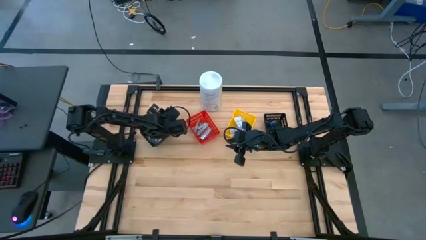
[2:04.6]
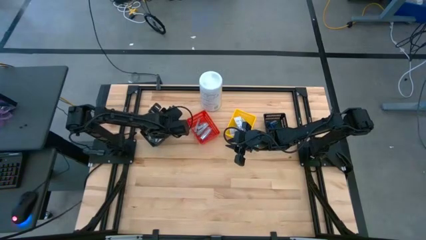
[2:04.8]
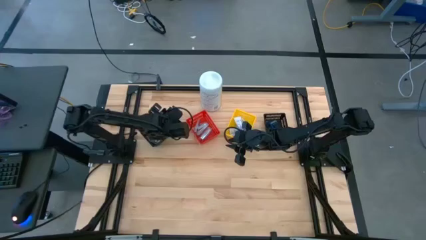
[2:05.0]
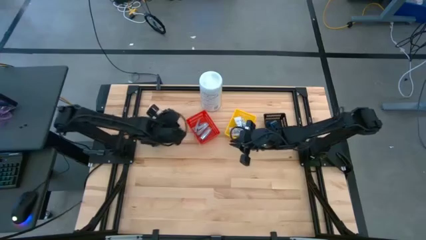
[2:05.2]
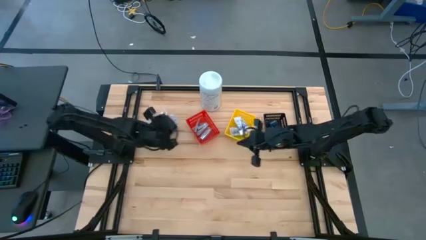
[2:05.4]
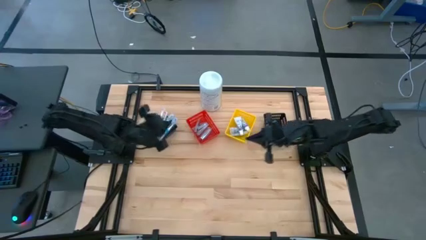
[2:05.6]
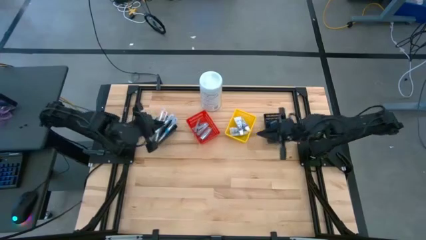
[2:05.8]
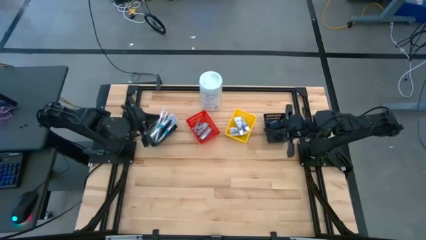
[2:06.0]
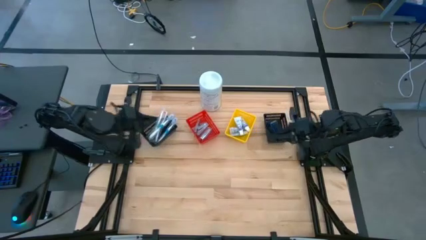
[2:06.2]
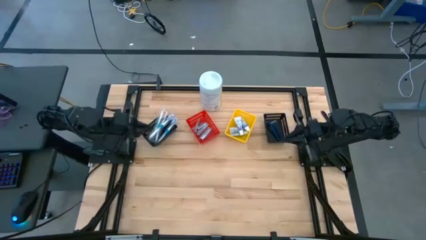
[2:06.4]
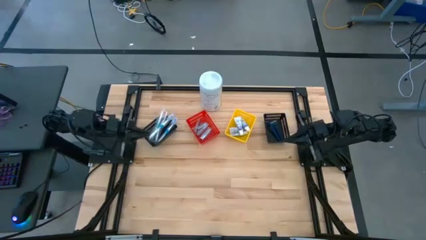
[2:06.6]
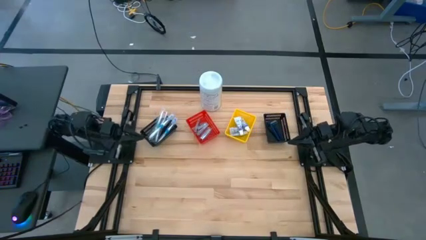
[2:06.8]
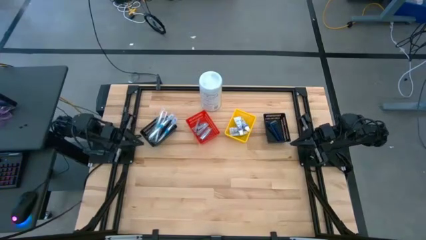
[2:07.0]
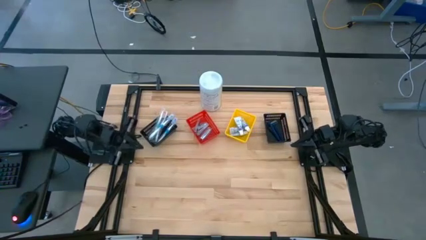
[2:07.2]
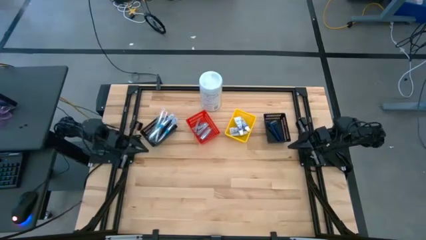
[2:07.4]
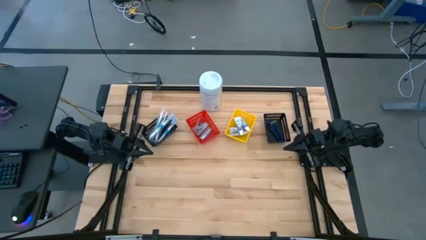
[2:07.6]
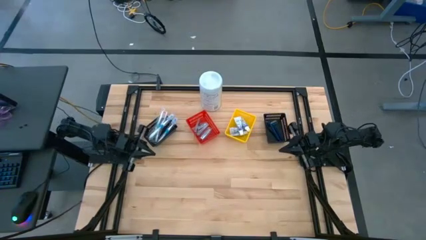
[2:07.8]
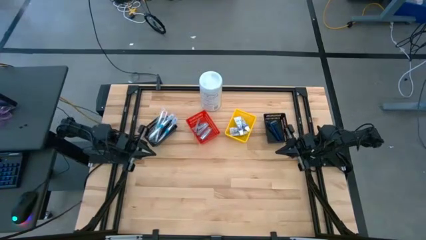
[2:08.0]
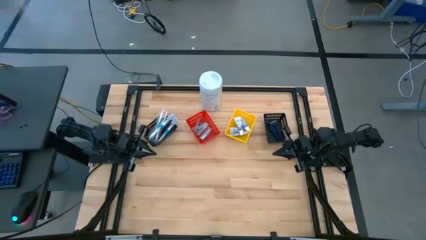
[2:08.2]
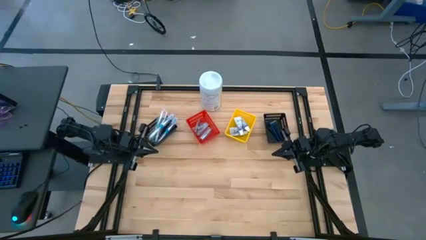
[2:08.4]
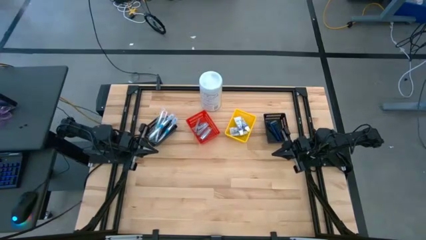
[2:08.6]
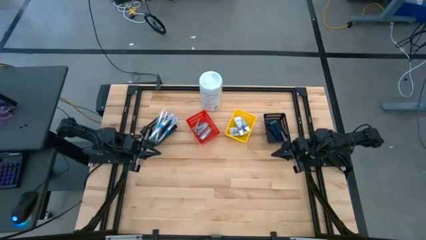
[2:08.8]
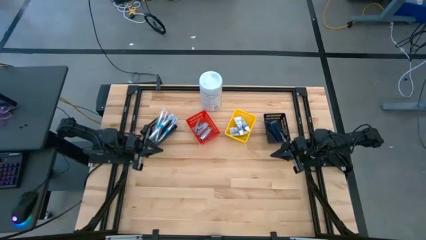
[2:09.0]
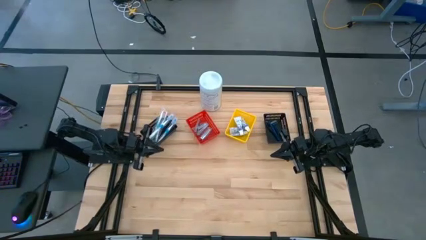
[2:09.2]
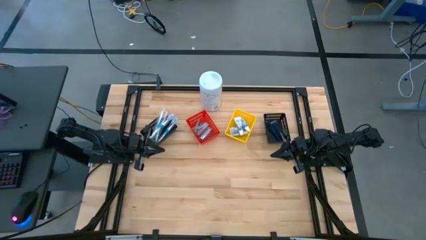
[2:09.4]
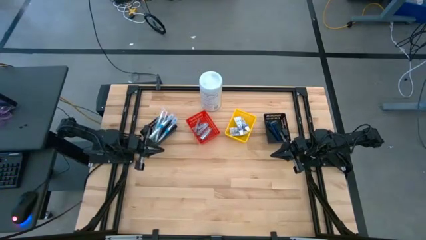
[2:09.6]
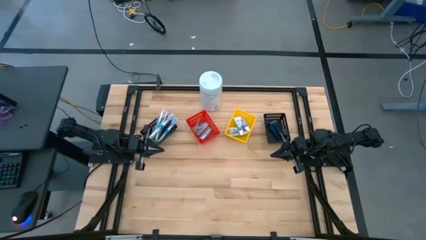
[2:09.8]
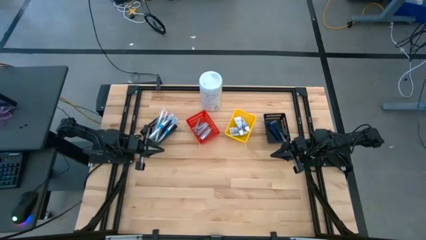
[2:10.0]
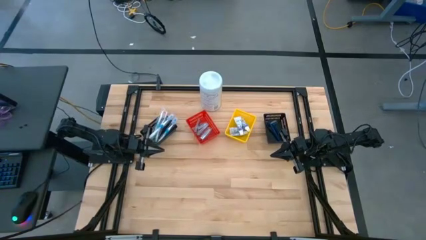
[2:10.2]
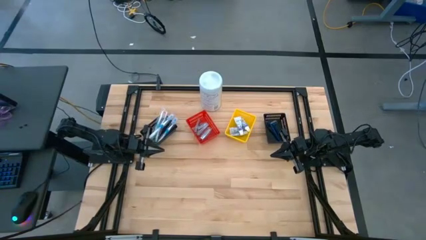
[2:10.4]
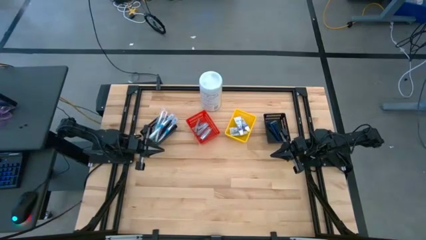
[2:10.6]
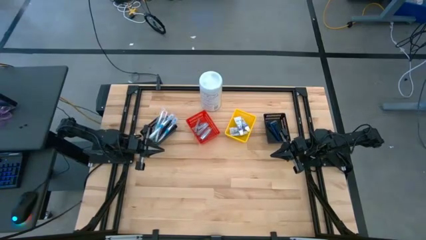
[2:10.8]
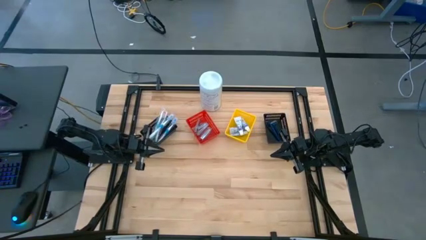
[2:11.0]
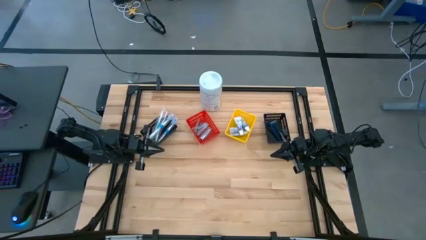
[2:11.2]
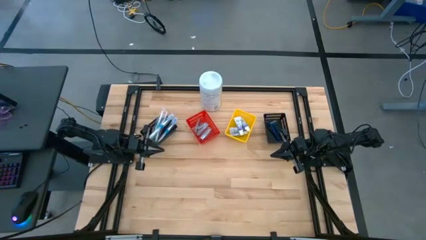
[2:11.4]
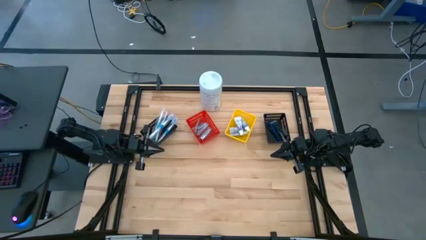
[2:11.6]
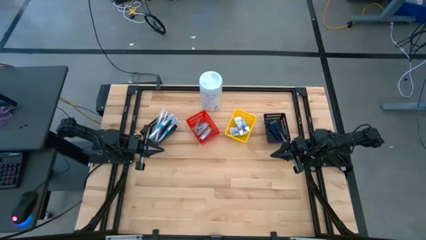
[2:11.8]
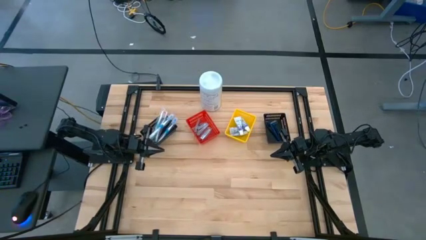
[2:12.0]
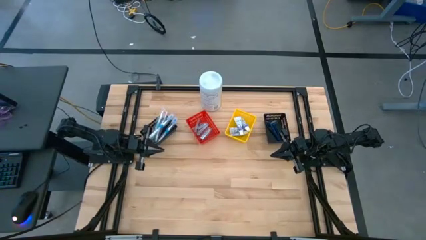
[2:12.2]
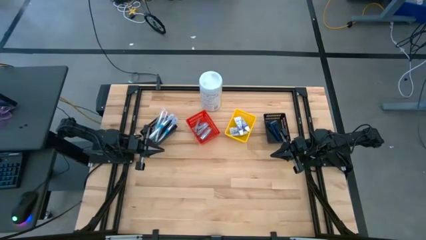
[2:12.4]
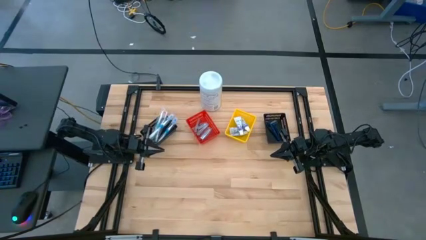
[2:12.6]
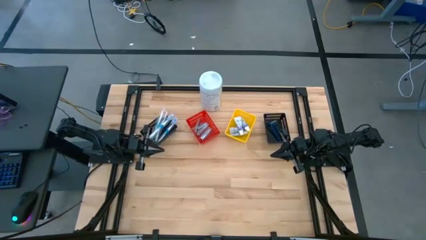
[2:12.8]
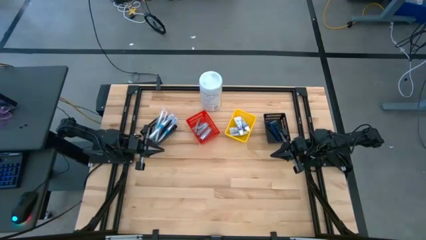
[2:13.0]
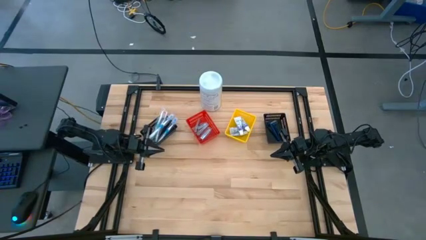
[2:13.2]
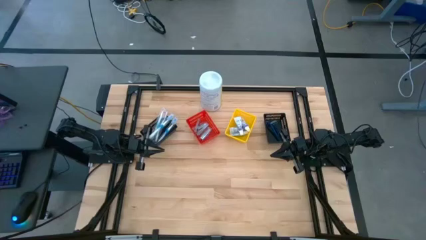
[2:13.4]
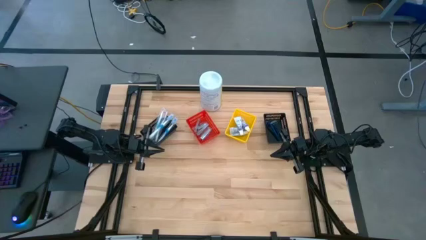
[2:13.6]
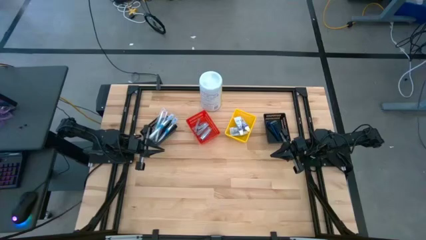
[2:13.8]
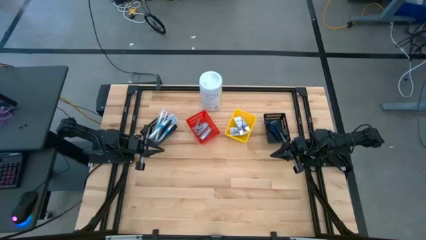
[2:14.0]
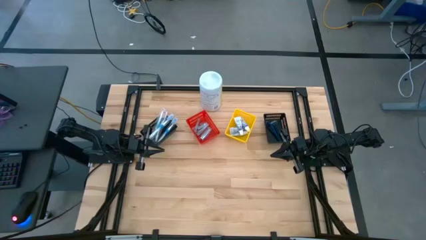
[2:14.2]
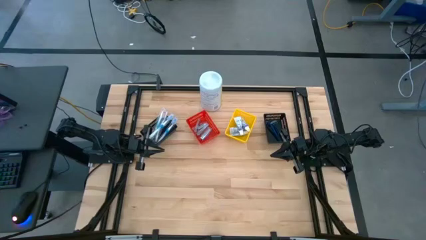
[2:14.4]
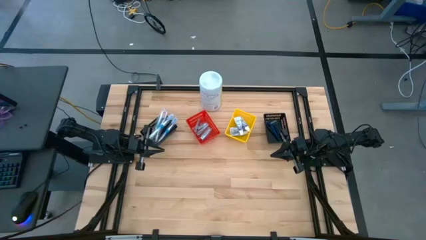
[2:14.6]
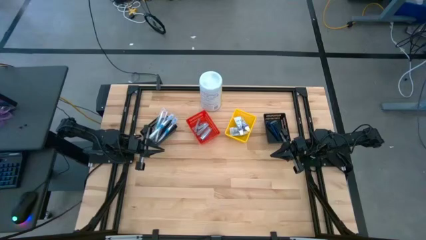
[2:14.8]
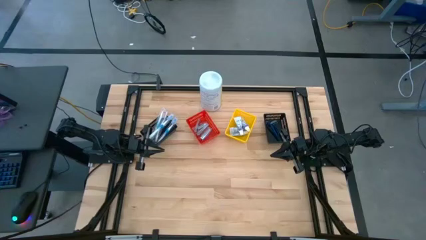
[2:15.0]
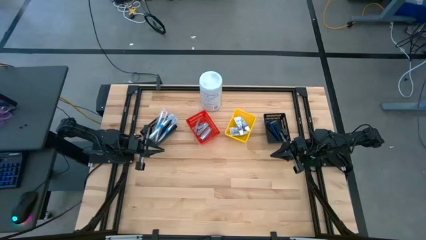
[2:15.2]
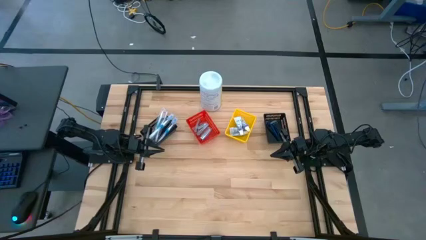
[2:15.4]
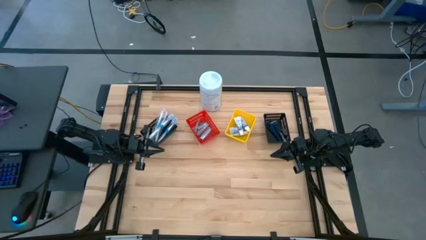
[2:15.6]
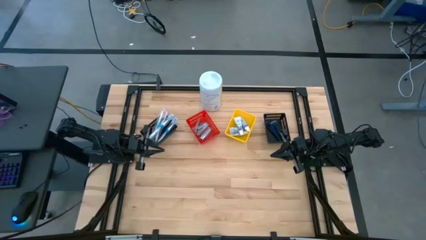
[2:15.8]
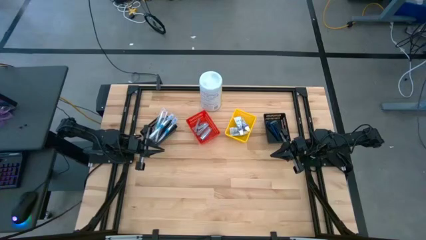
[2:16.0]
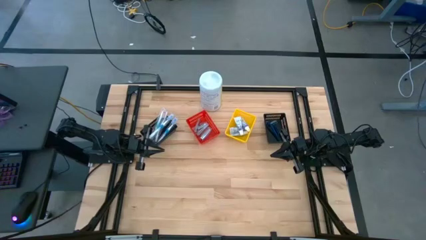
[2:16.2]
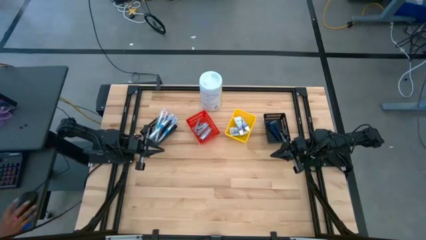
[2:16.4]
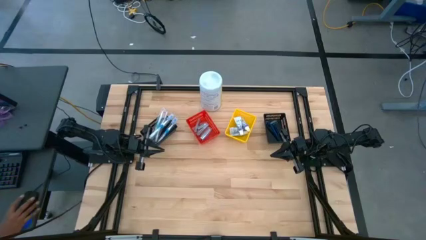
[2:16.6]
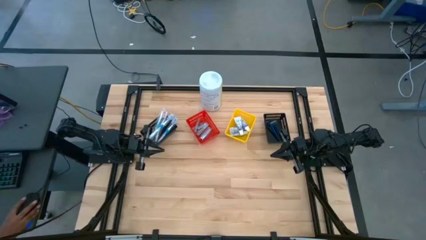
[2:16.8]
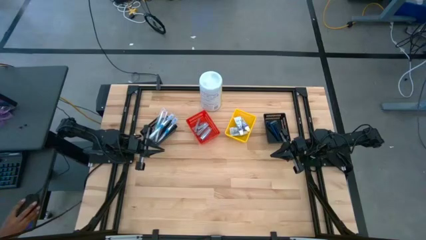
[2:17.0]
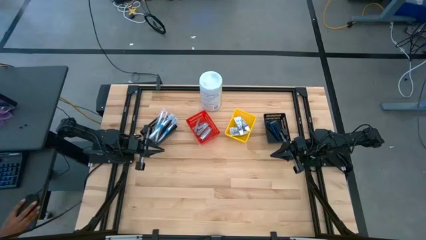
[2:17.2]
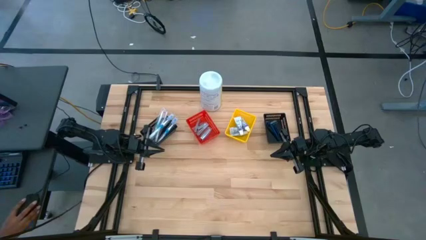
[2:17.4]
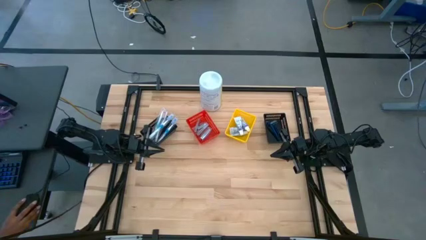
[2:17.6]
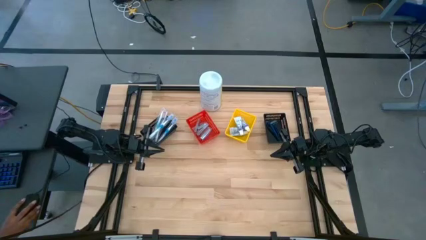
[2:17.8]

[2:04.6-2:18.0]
Task: Pick & Place Travel size toiletries
Return to Home Position

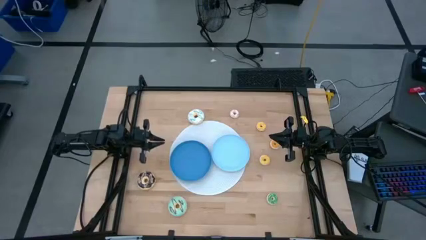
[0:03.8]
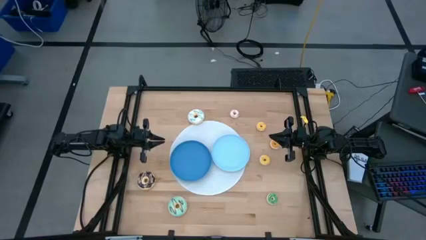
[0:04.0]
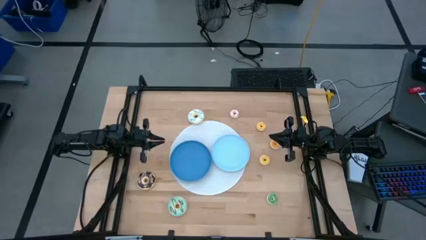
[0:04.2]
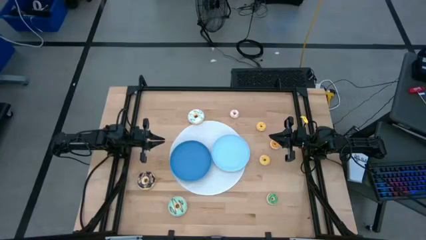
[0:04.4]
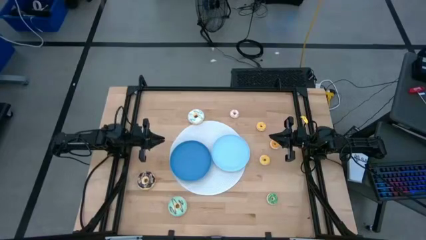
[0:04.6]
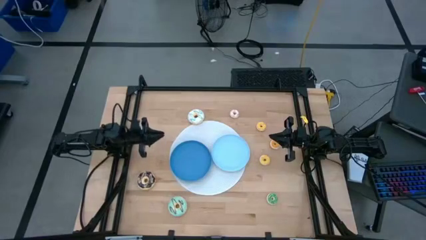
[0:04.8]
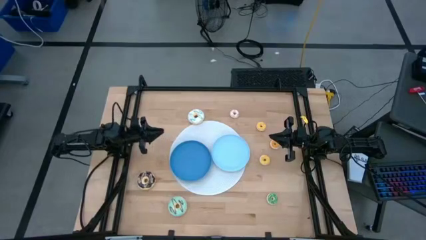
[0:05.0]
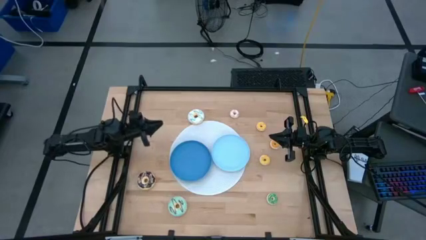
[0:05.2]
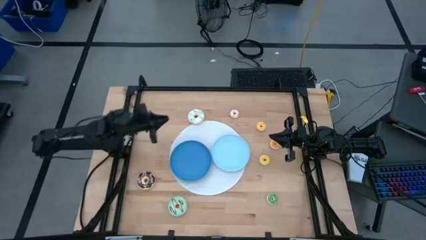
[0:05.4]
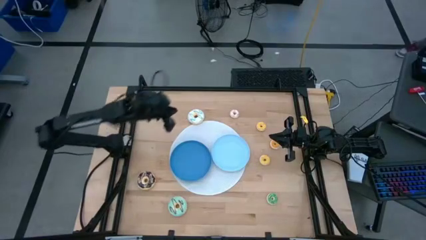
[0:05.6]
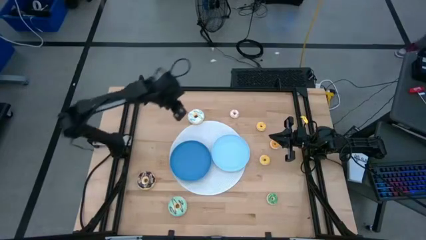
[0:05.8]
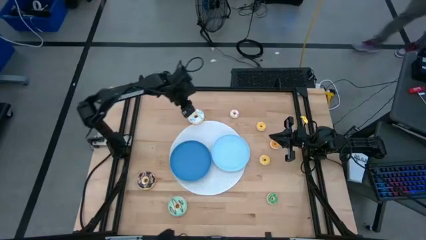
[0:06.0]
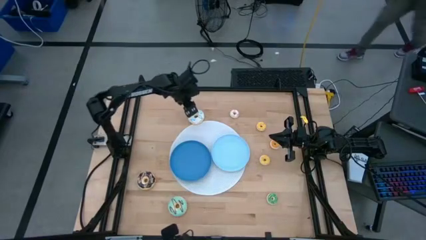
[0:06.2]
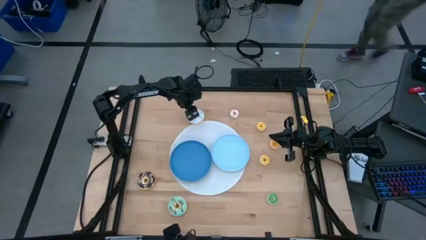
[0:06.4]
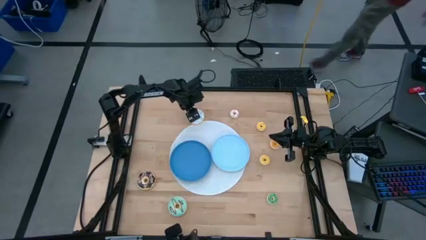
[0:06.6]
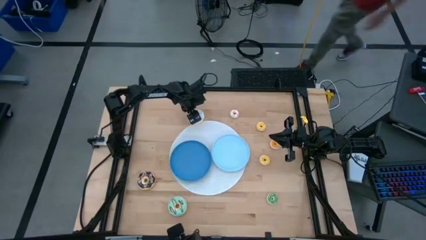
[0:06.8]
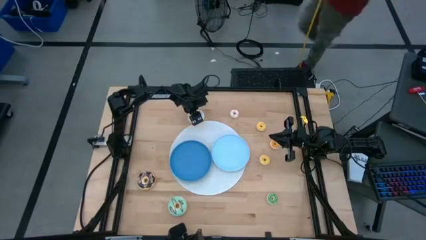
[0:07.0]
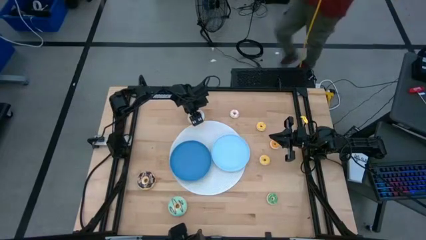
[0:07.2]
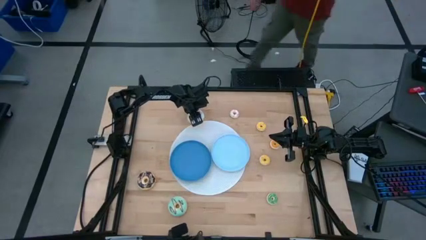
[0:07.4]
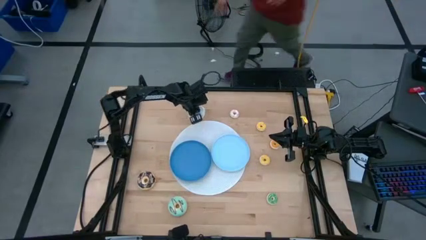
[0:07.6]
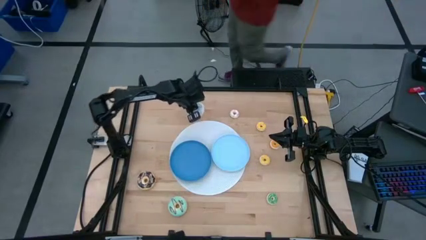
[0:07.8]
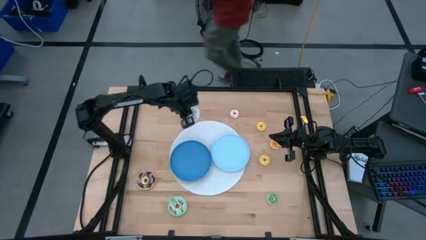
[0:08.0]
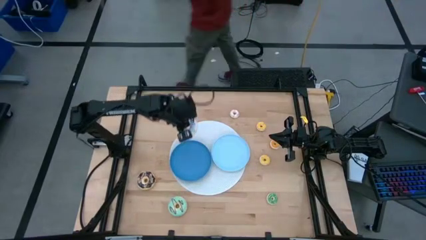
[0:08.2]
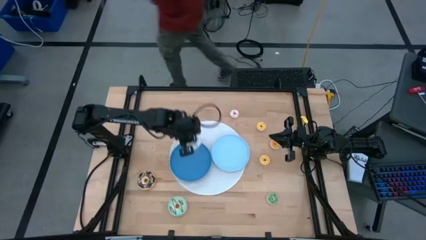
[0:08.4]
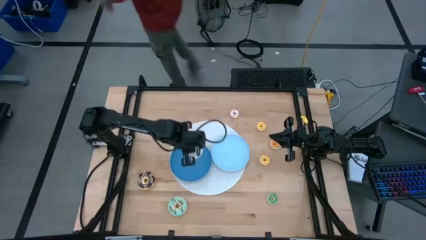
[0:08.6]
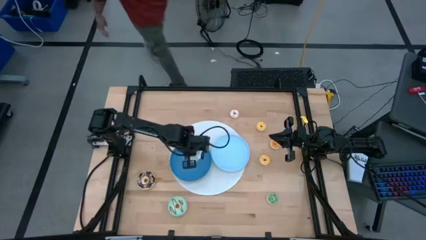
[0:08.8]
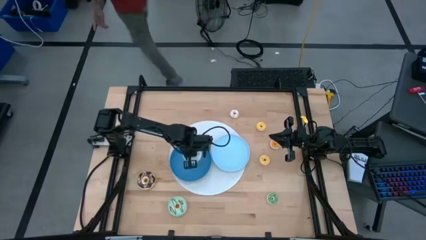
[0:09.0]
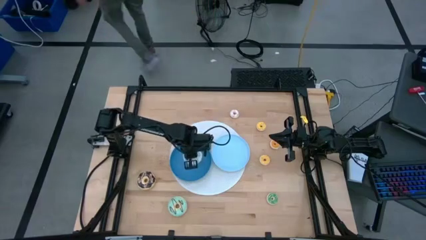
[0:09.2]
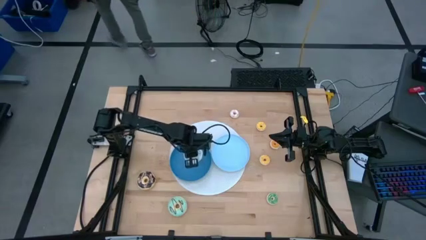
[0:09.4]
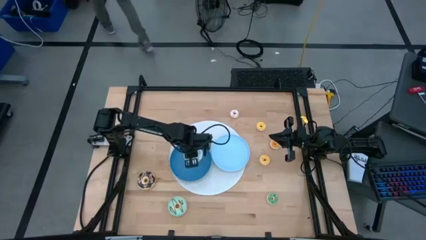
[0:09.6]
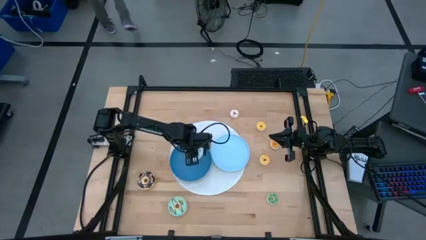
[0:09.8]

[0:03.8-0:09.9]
Task: Pick & Place donuts
Put the large white donut on the blue plate
